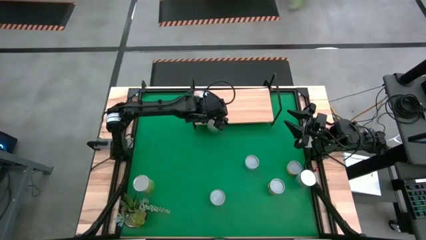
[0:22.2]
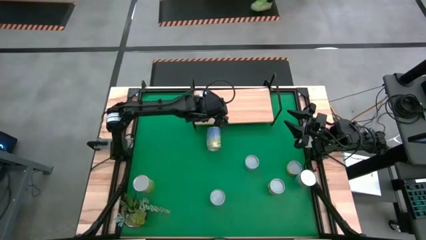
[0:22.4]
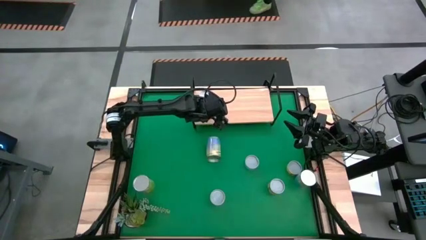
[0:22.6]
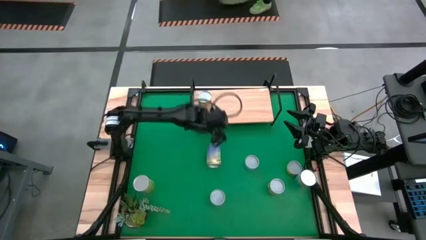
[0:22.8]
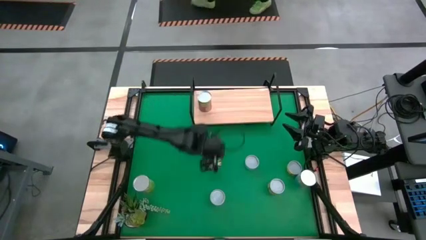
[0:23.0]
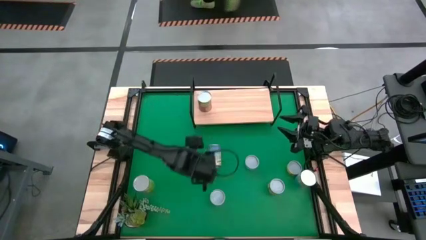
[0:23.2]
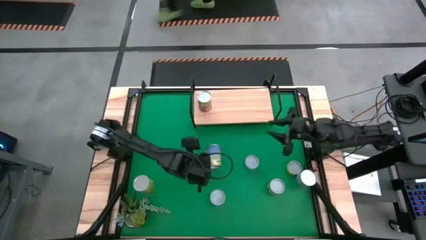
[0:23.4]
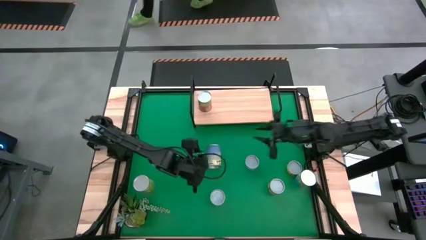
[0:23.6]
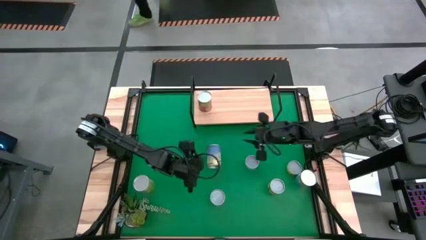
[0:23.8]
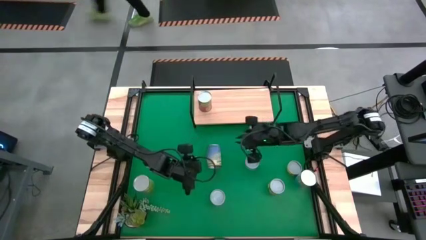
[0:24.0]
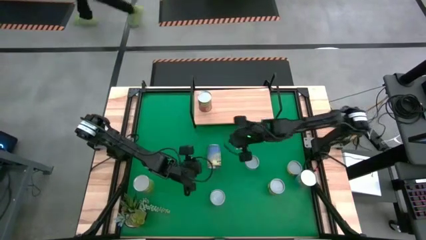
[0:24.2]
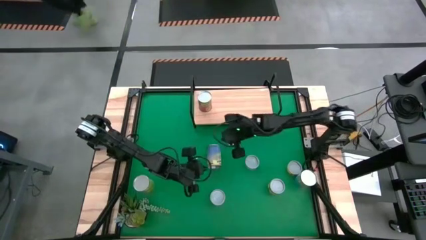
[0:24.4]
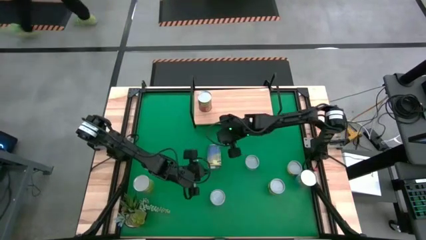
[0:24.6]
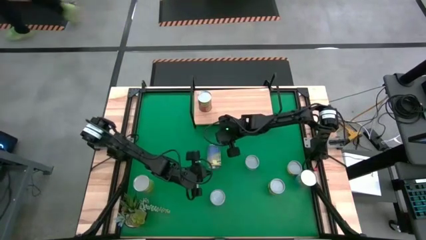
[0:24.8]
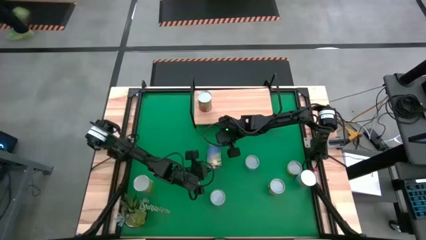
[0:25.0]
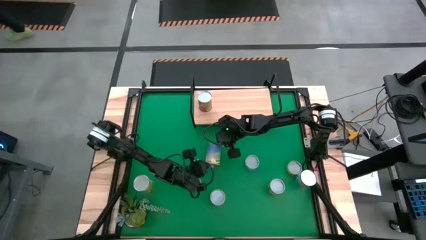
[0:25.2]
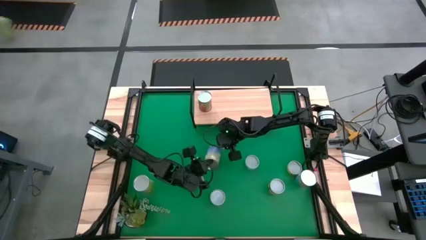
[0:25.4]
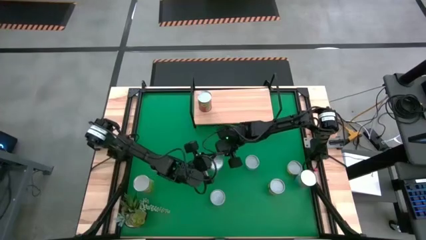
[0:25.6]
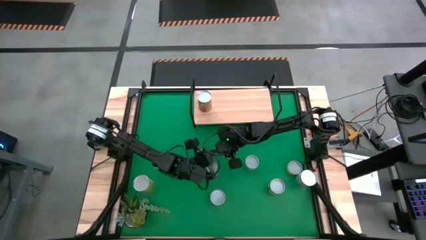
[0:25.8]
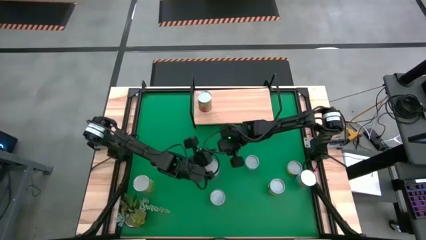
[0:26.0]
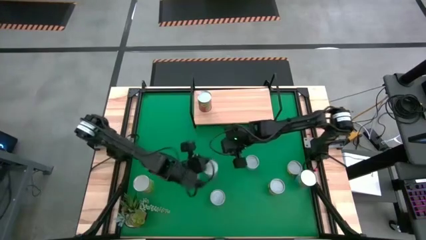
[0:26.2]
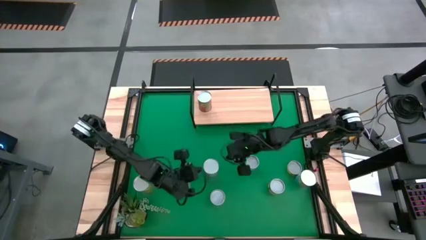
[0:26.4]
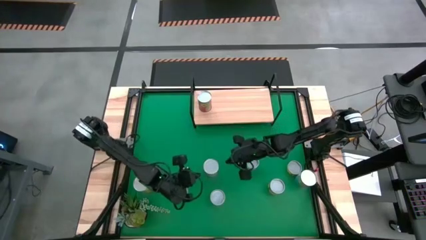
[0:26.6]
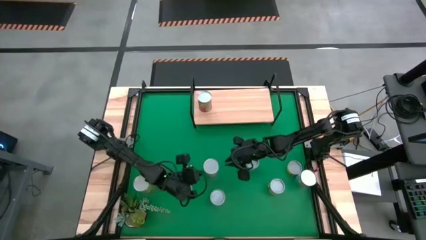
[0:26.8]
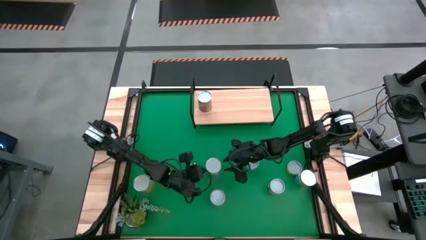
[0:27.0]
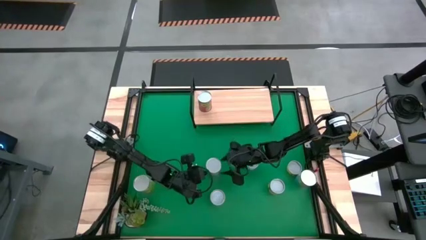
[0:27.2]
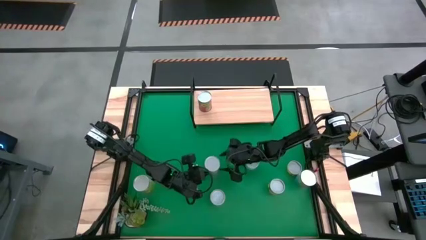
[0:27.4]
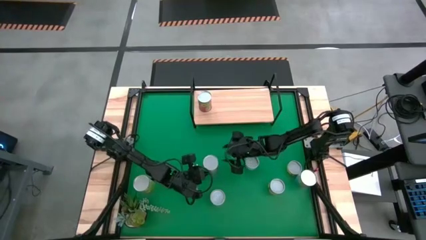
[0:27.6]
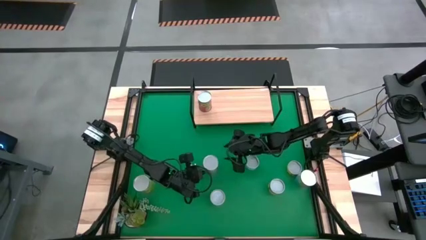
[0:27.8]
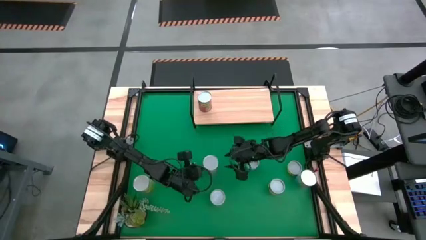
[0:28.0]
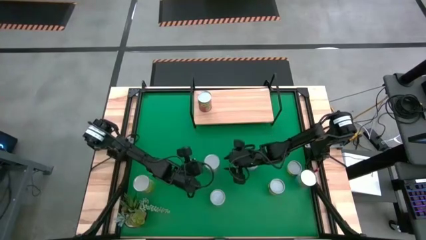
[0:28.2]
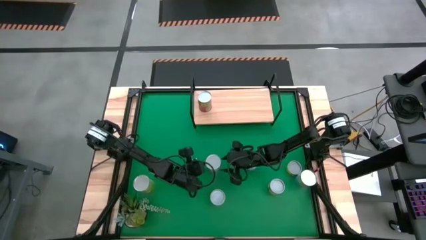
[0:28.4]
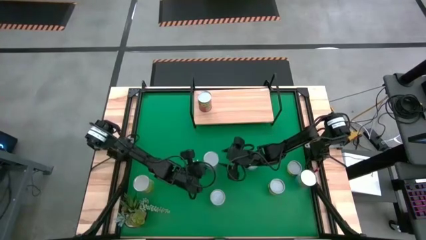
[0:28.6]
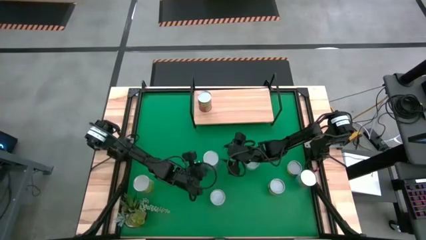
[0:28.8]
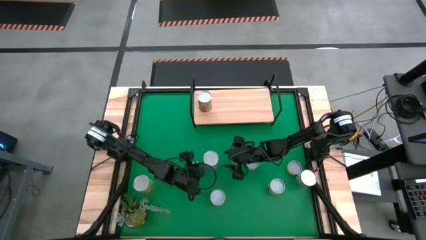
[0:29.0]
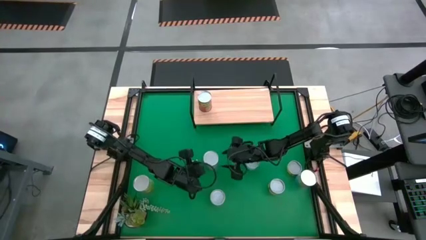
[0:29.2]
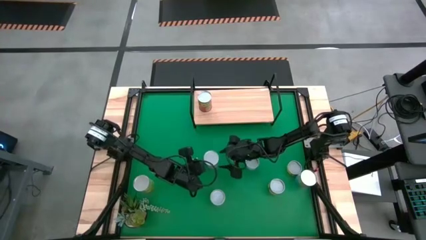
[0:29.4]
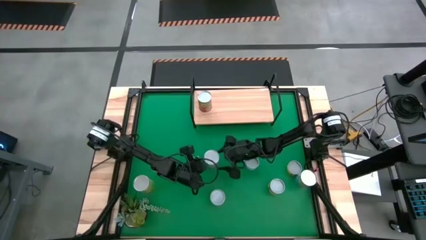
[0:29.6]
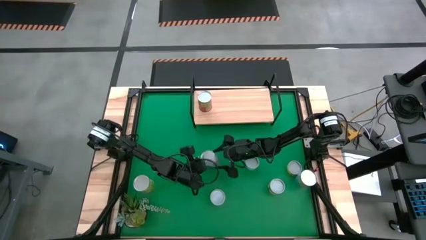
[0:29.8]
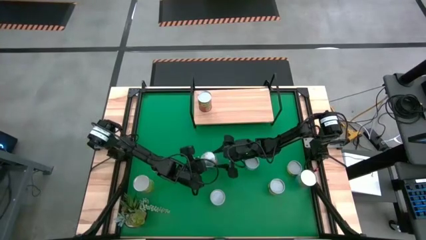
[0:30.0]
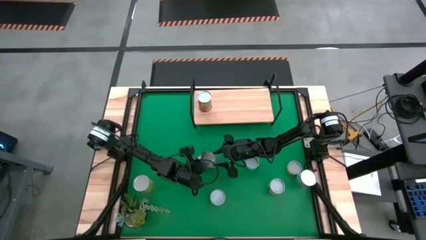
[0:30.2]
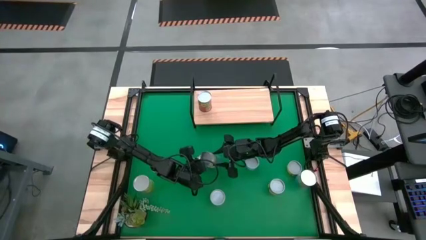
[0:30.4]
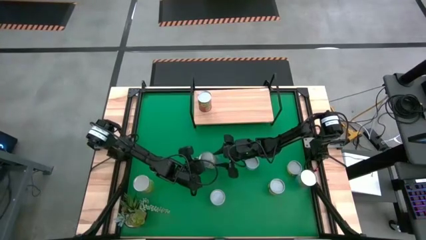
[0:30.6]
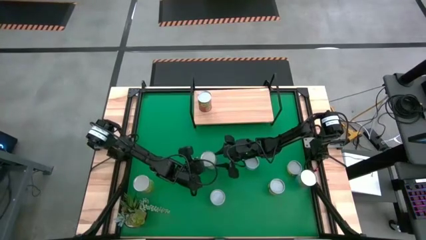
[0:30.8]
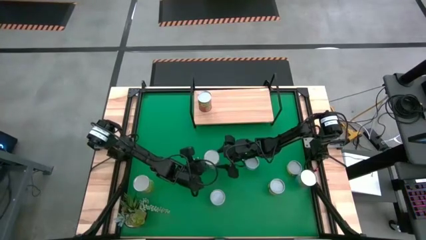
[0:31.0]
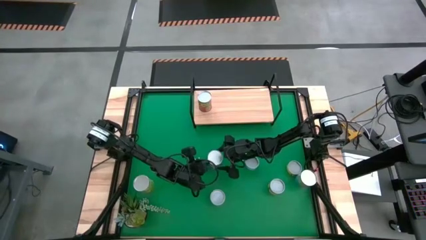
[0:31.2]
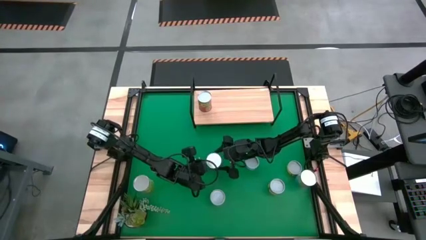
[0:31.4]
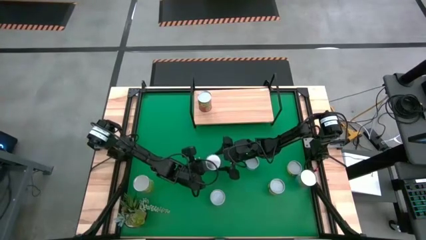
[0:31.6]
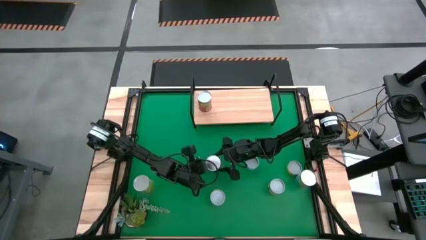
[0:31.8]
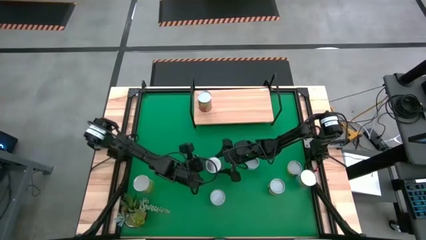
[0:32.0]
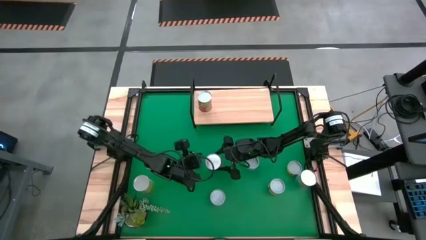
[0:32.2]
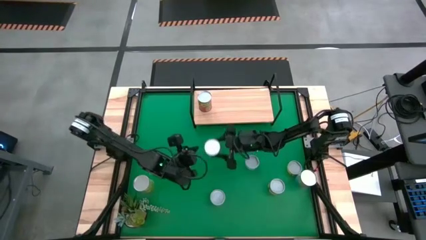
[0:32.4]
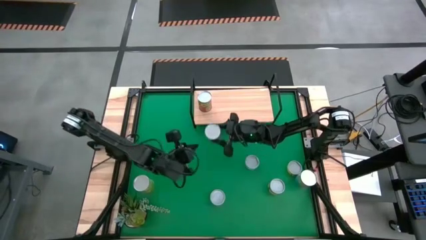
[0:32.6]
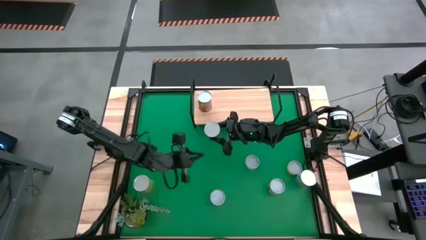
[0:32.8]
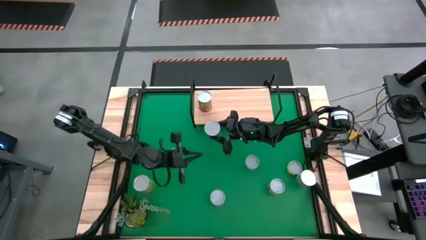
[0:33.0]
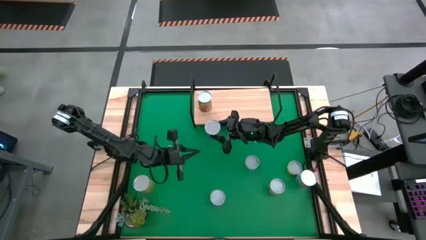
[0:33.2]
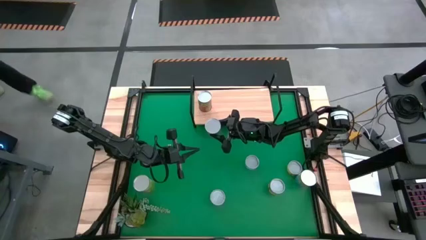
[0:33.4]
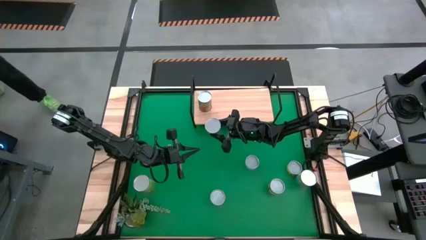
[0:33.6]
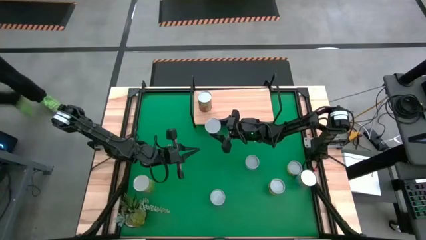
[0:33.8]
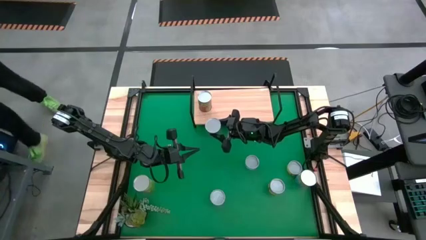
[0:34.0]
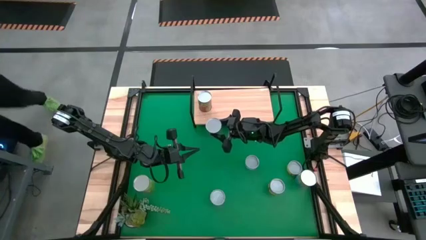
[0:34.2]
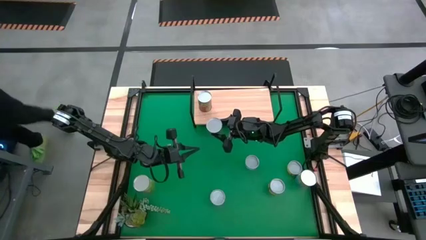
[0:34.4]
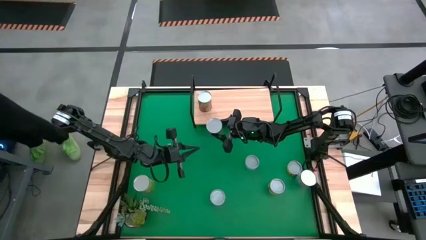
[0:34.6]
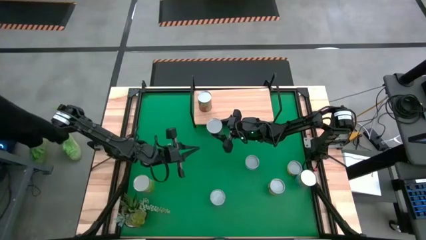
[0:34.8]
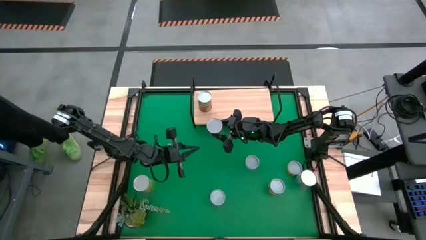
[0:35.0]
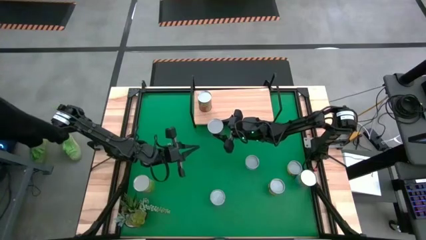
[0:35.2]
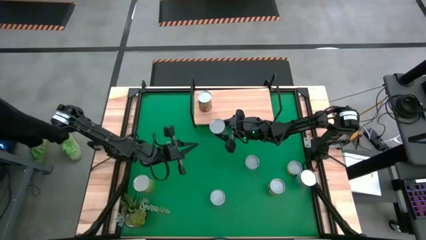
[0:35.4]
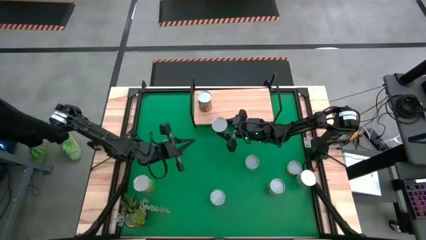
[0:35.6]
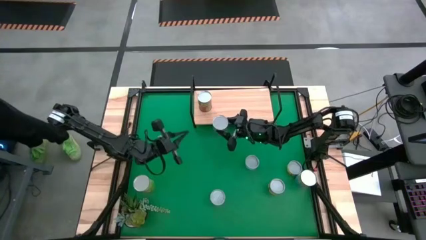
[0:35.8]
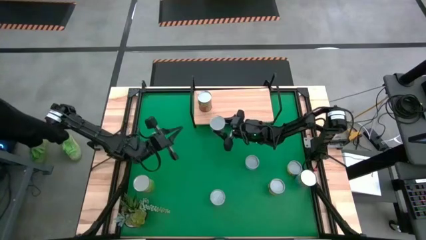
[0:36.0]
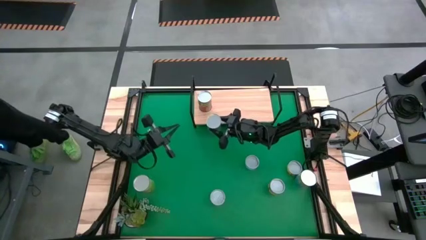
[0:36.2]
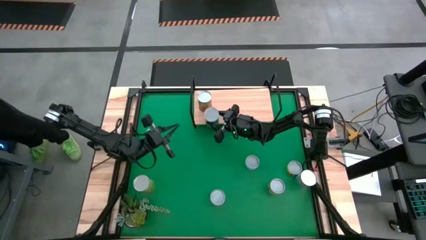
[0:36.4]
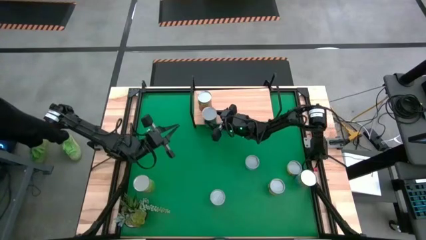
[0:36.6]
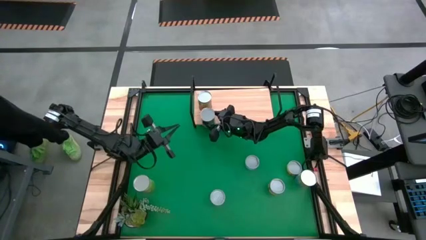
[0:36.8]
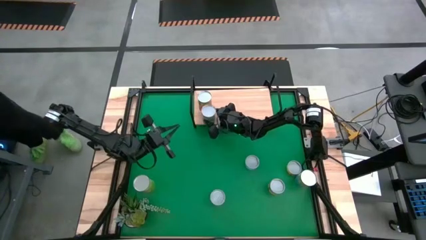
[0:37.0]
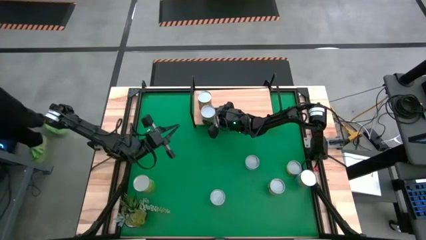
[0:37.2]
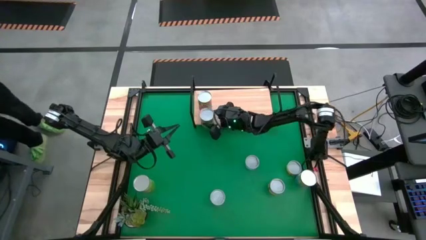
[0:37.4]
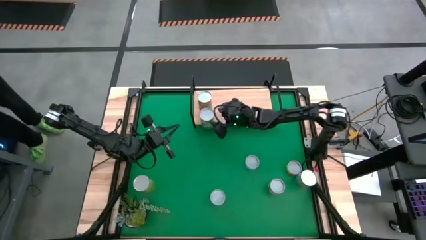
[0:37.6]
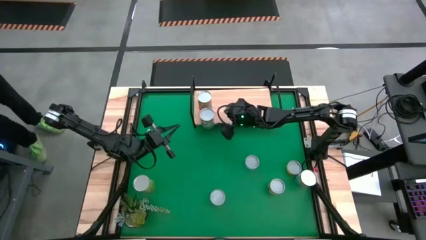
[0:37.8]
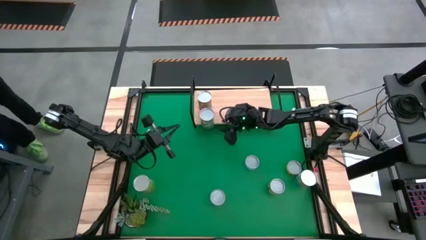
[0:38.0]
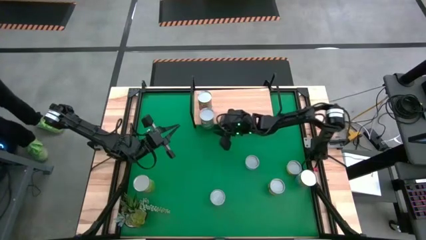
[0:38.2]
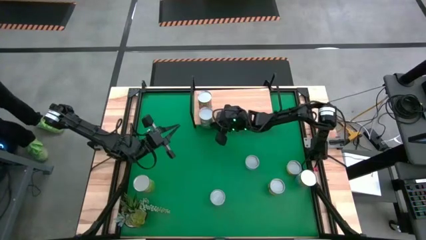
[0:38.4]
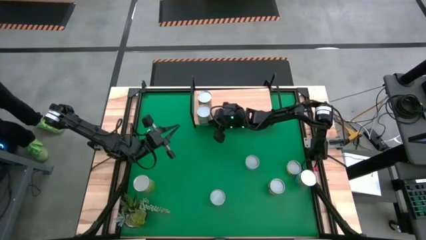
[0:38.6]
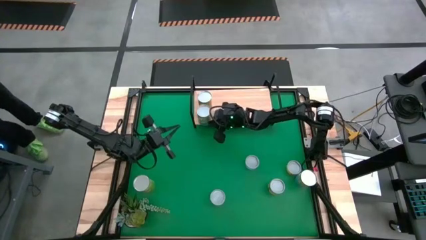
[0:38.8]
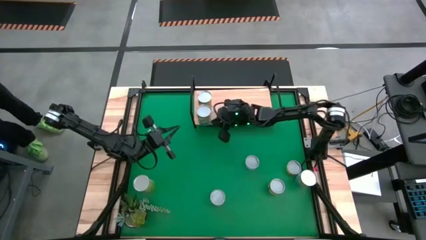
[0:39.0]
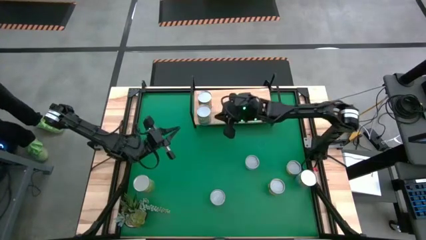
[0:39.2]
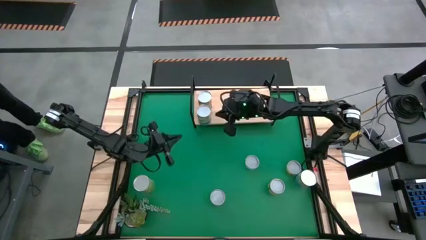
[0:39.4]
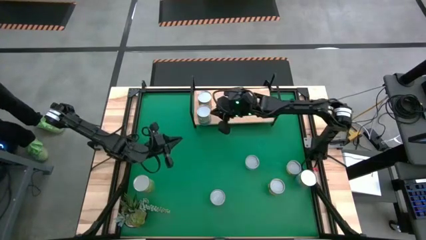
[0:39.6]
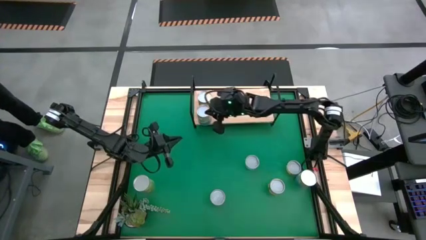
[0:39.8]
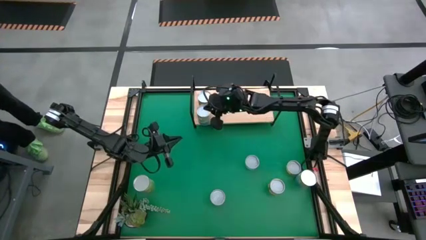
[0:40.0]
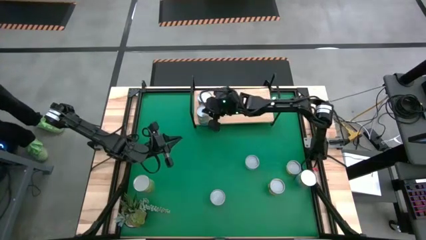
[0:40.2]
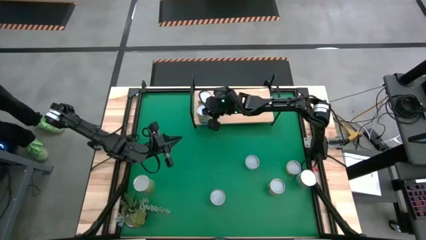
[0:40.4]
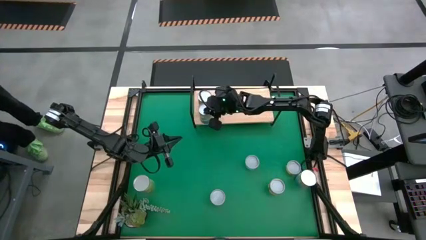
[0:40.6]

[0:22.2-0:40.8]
Task: Pick and place cans onto a shelf
Put the canned peas on the shelf
